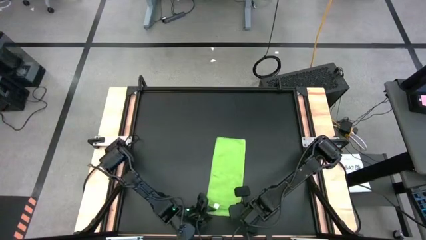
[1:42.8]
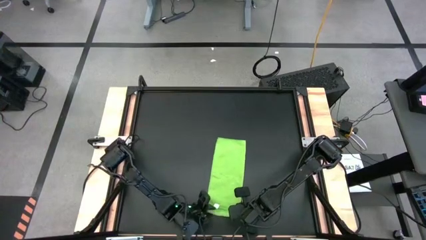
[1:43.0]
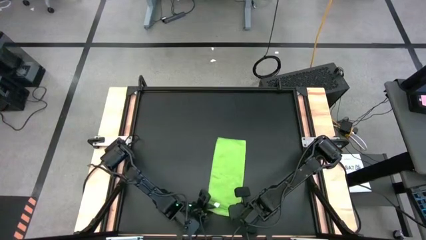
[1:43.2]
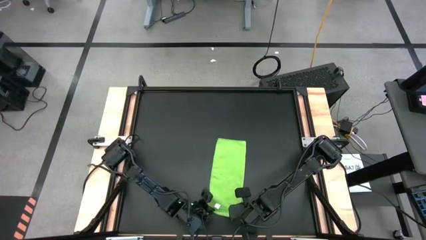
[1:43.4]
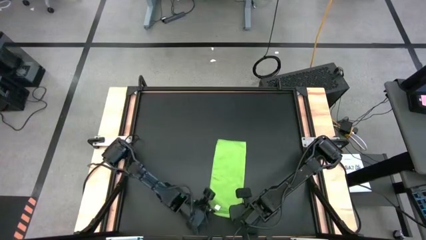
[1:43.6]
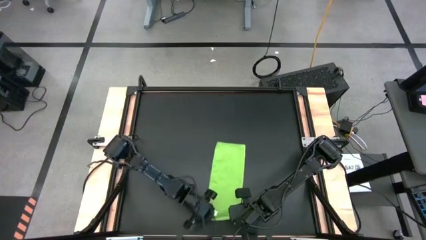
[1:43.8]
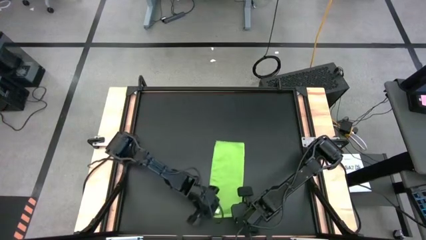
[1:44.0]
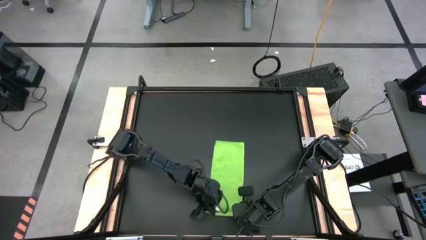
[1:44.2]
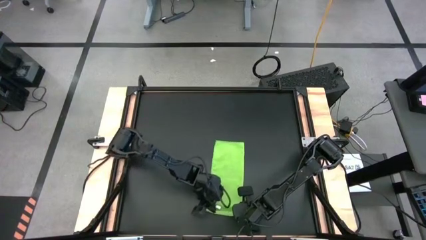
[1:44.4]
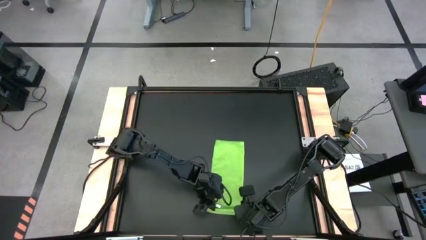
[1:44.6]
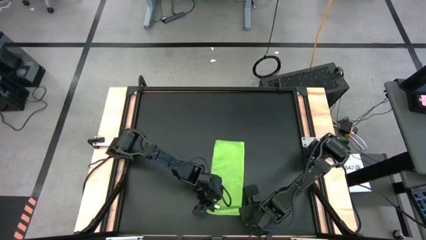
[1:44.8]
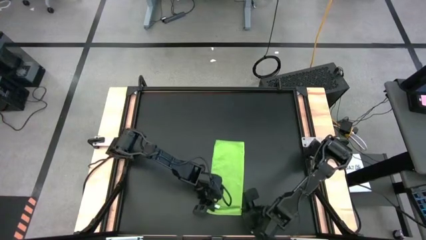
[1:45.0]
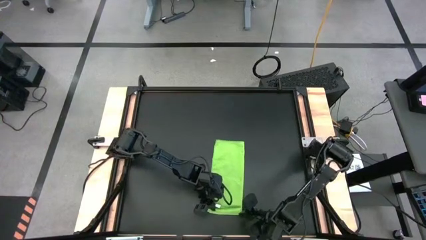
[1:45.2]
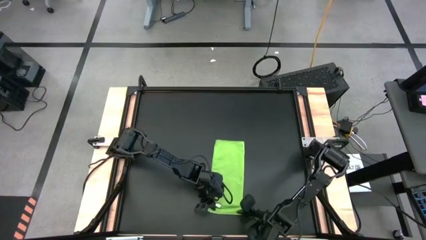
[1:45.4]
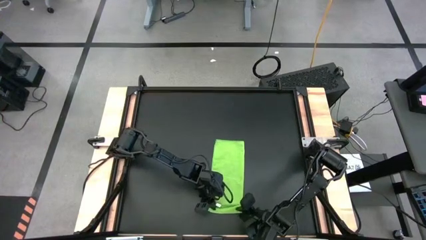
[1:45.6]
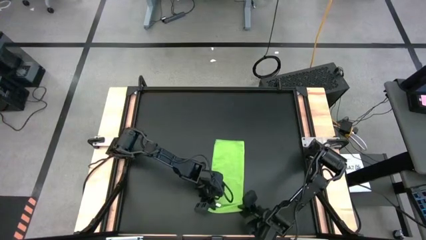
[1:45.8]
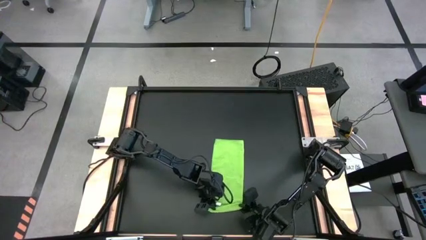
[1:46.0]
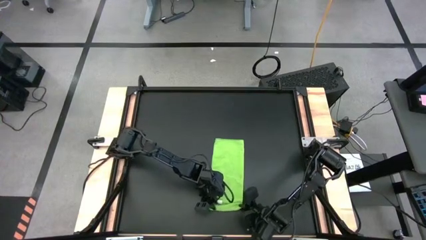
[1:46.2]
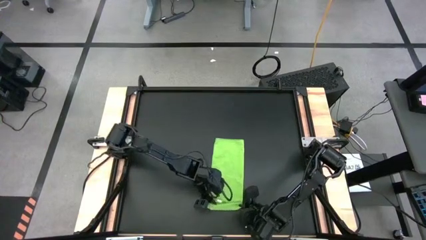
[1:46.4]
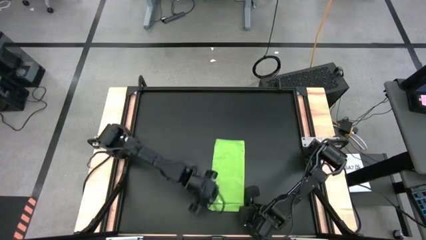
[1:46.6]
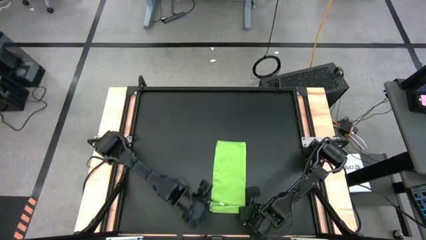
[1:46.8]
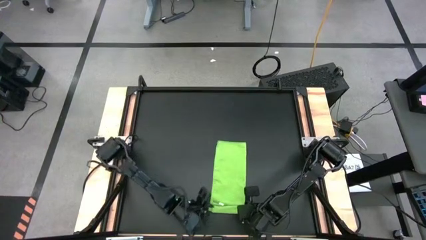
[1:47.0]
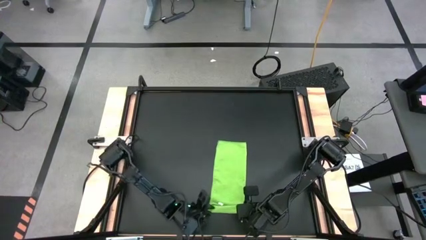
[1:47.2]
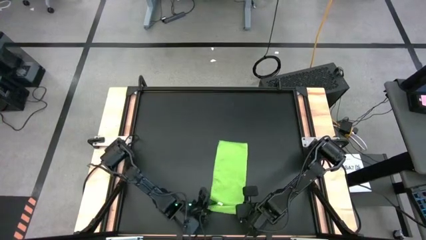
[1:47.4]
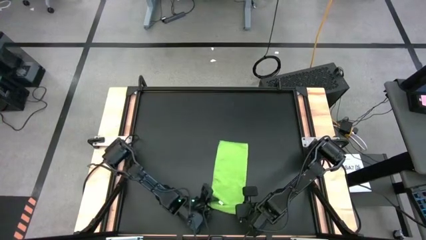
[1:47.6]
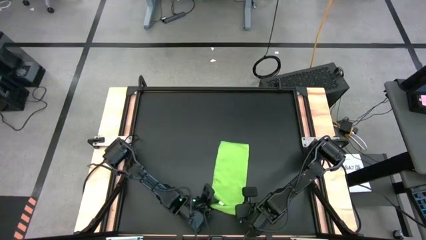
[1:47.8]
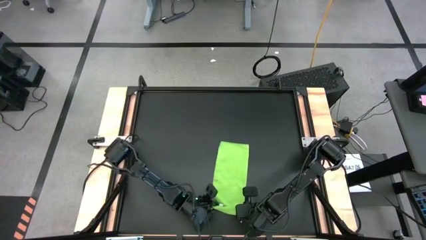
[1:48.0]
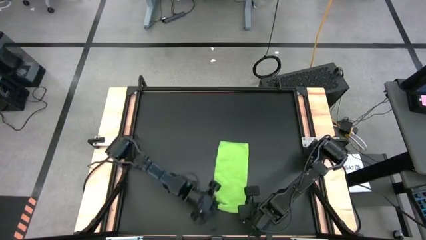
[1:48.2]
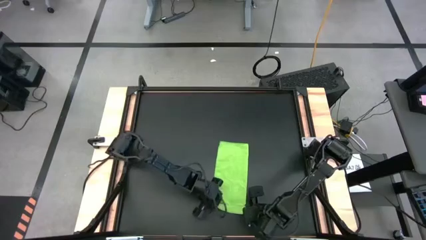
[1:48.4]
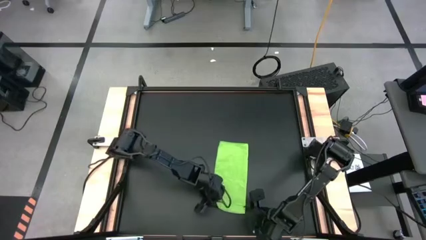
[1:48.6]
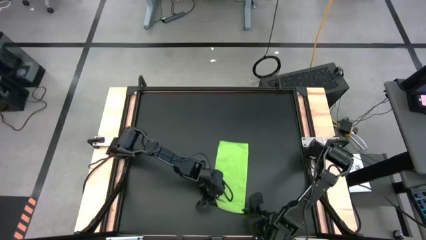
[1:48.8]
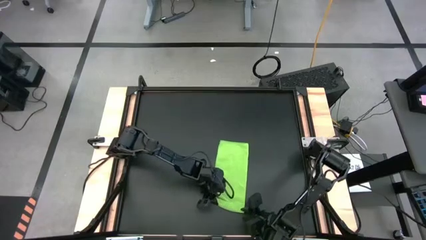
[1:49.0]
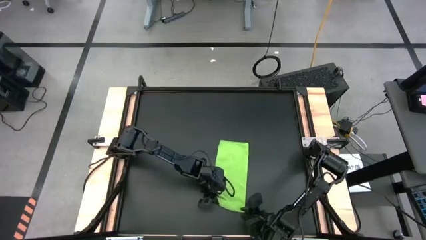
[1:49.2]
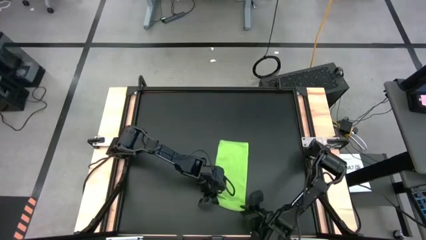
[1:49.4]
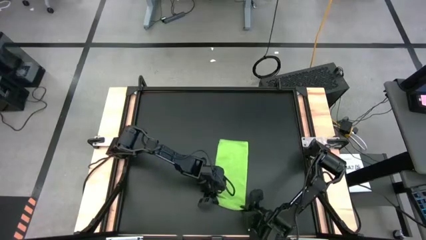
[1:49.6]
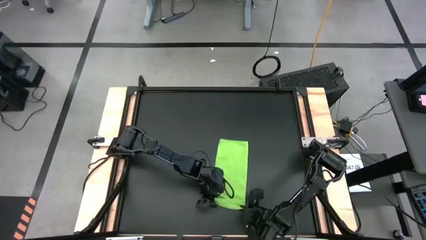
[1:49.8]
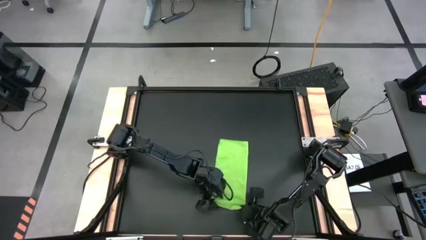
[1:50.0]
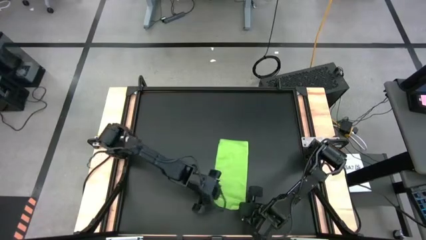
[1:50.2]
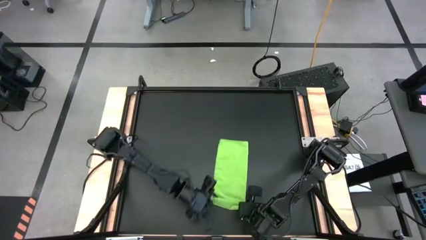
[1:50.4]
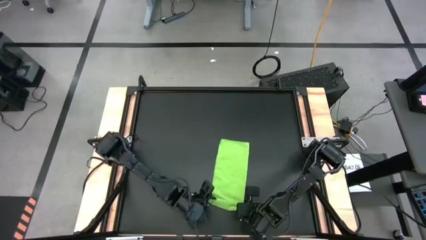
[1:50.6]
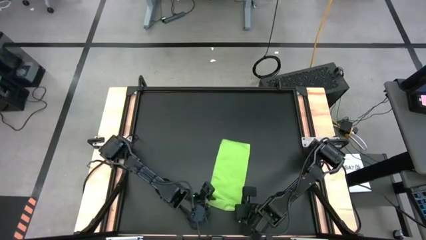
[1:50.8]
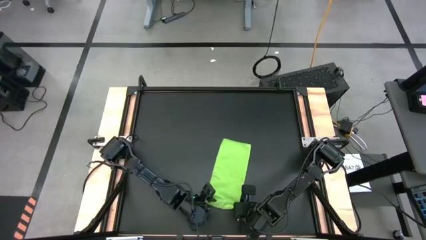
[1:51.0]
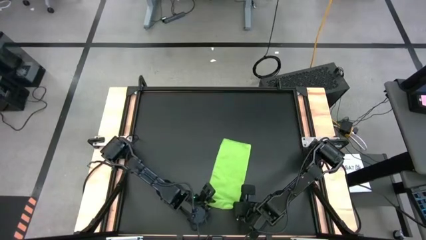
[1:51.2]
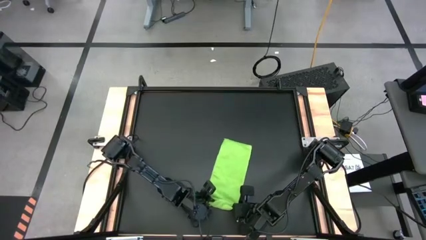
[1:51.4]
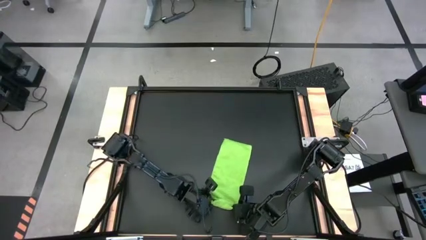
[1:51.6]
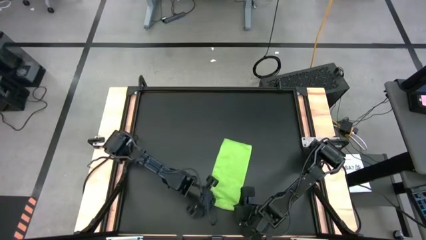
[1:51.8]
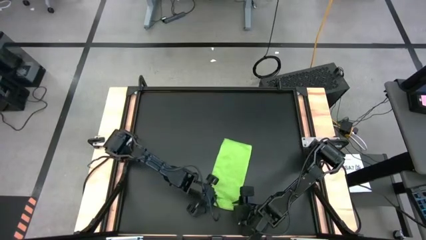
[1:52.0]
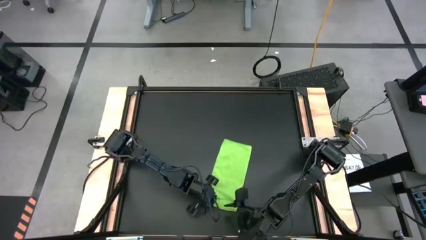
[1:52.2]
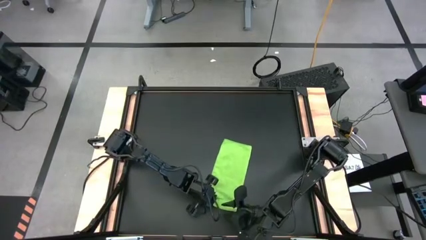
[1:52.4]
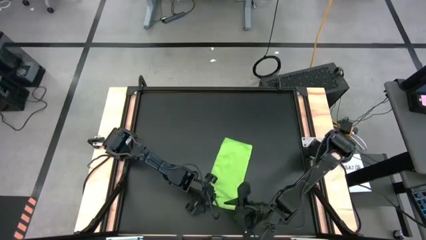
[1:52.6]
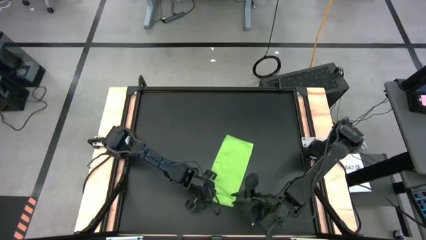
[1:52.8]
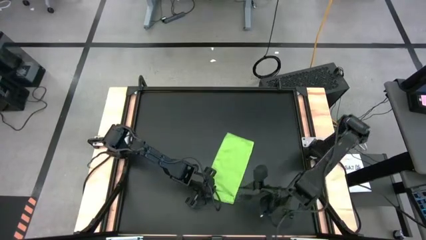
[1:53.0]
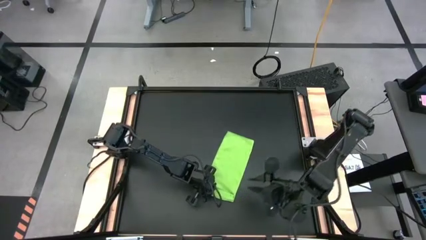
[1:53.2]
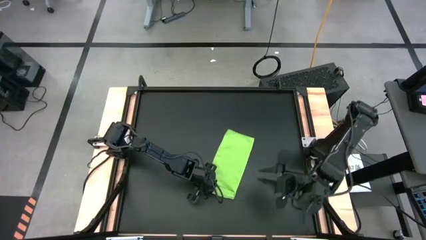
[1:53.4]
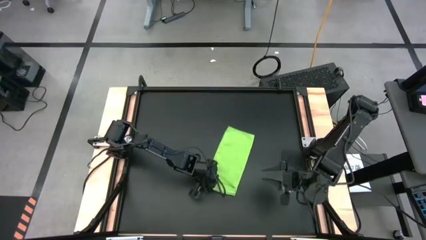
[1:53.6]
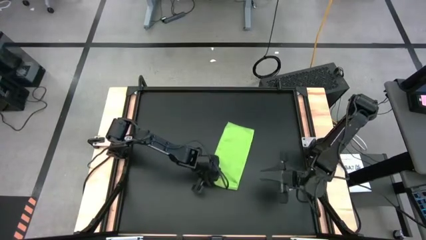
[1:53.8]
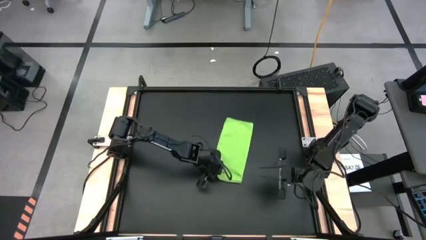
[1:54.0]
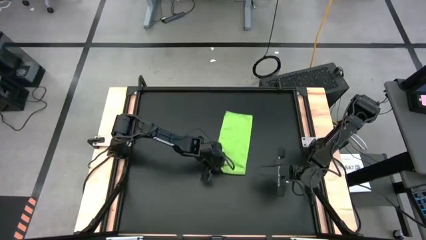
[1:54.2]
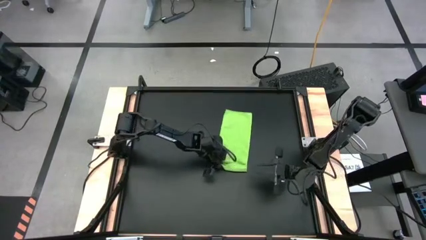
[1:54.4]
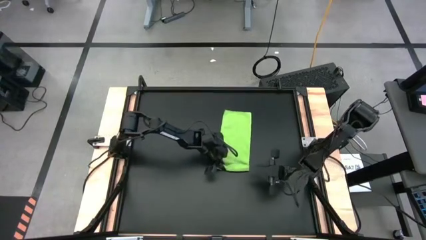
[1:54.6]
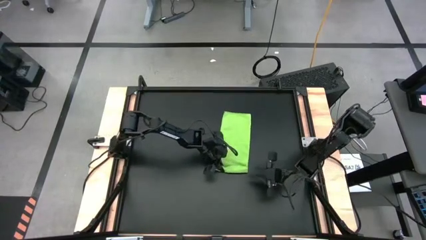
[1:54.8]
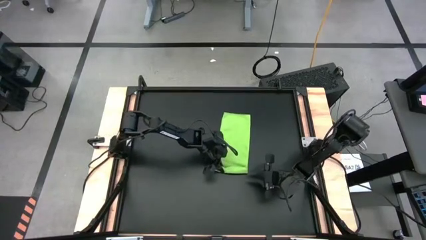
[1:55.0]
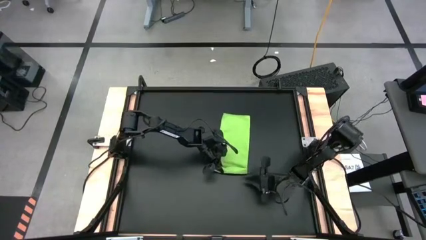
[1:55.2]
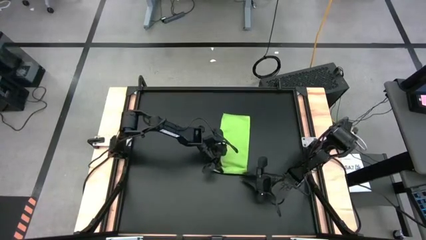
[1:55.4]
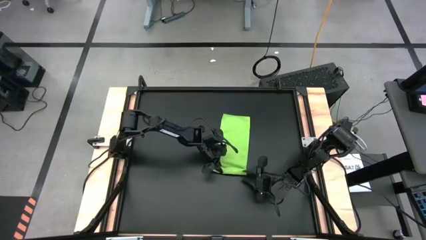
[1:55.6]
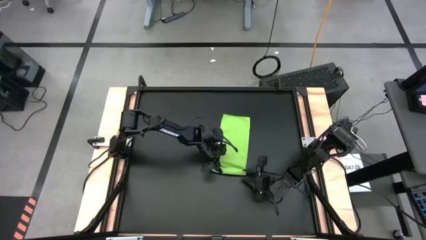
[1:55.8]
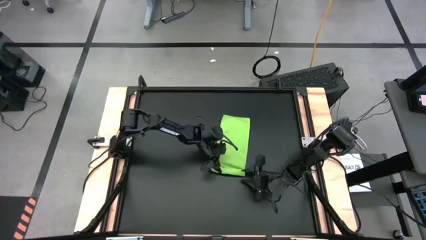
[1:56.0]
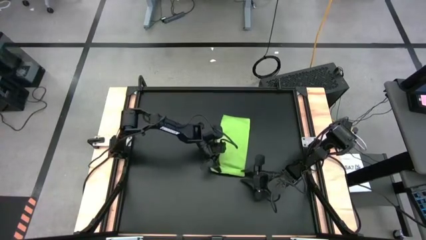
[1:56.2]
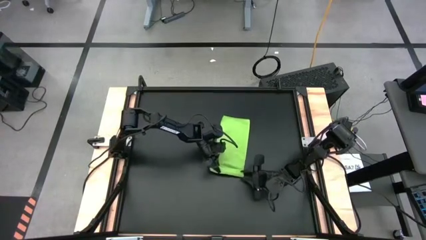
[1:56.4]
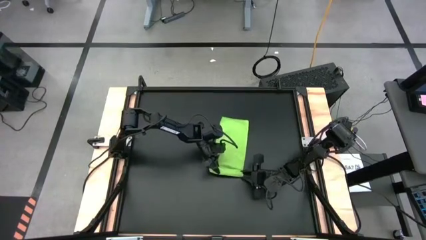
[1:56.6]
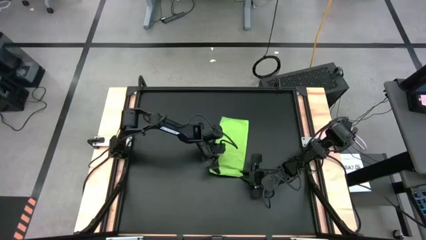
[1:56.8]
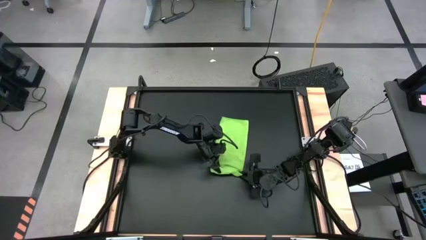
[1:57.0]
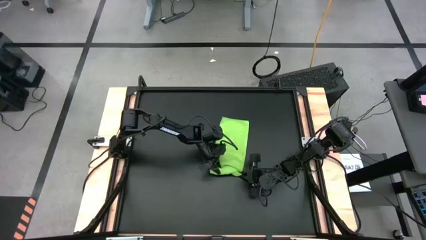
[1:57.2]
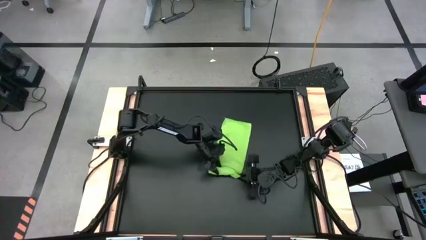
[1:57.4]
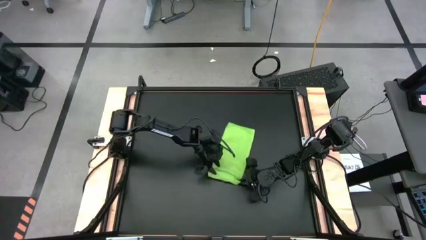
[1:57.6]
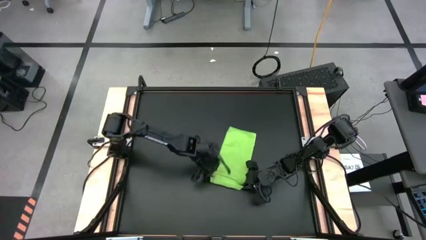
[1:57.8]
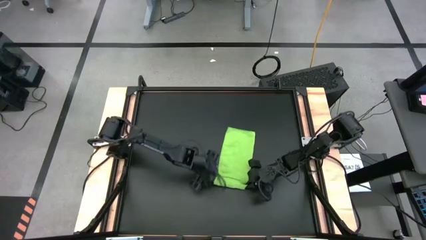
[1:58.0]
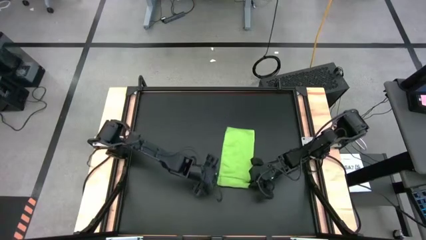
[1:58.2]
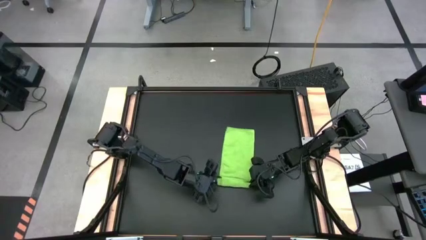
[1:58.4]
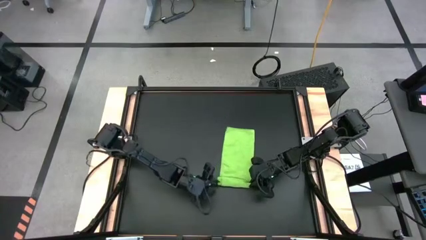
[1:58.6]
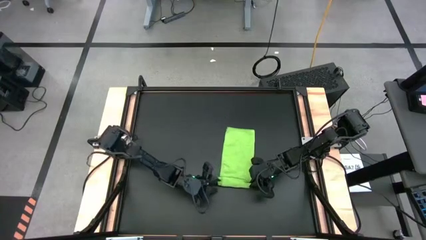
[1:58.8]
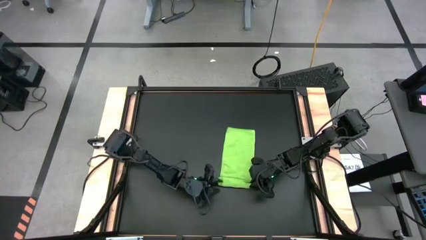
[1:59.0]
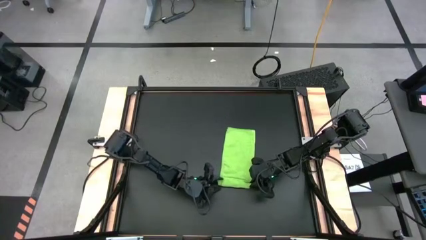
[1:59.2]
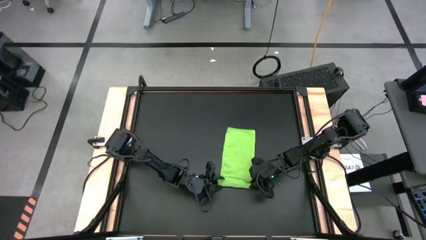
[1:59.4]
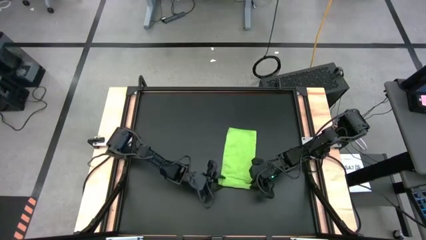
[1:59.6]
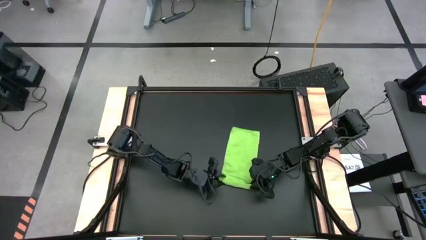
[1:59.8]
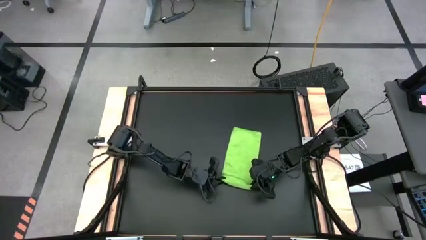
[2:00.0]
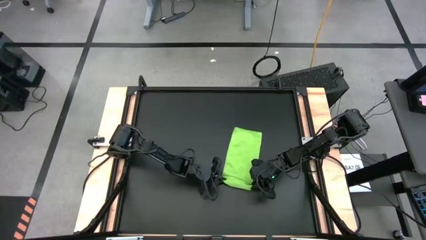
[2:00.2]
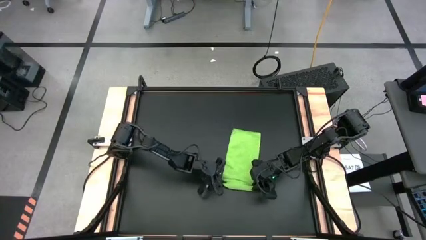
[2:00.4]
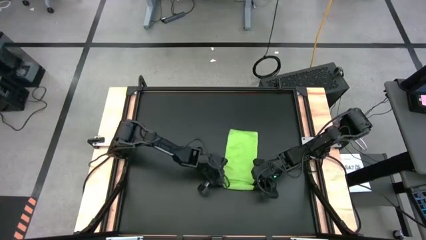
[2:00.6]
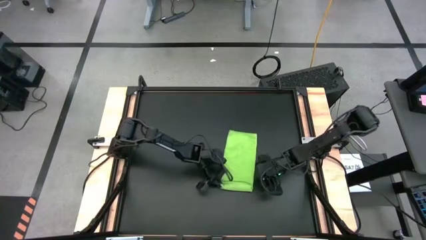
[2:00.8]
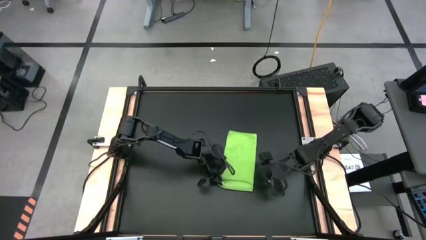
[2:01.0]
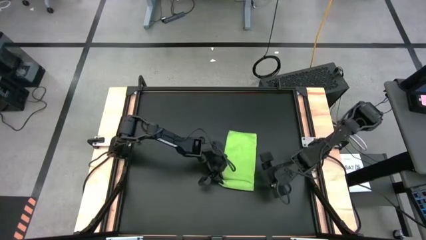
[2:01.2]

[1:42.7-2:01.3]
Task: Roll towel into tight, uniform cylinder
Roll the green towel
